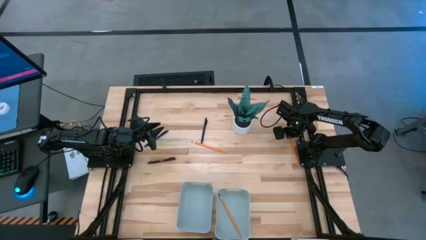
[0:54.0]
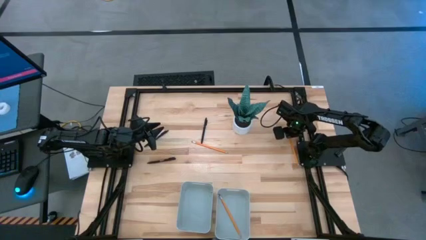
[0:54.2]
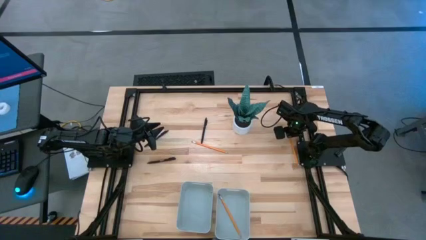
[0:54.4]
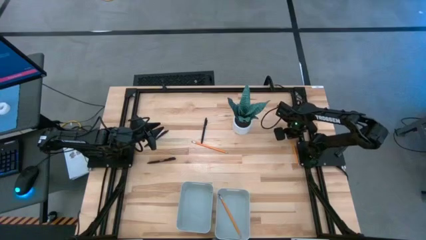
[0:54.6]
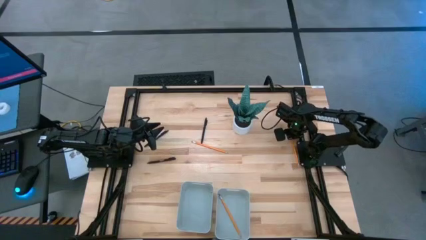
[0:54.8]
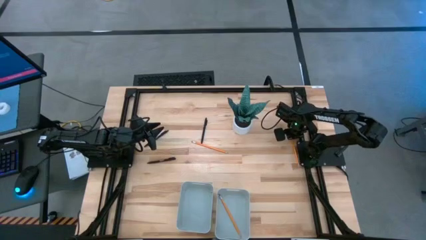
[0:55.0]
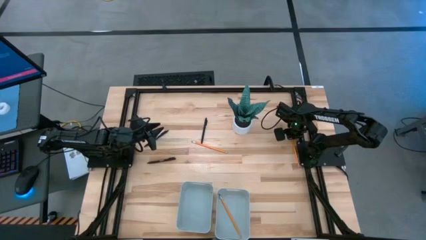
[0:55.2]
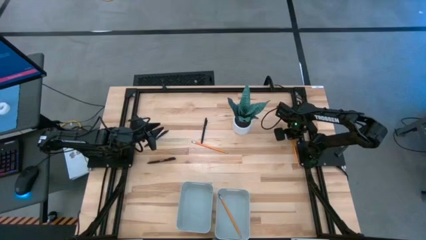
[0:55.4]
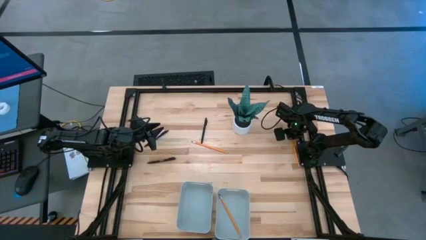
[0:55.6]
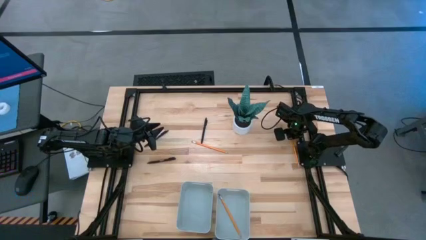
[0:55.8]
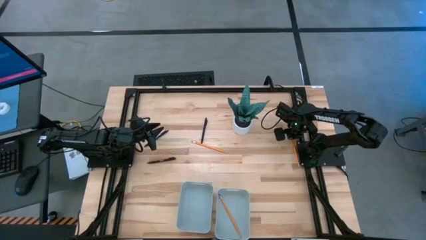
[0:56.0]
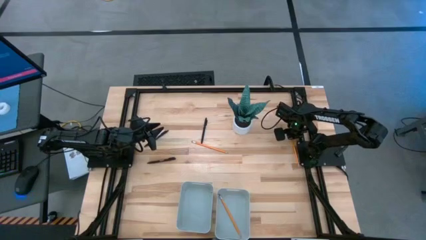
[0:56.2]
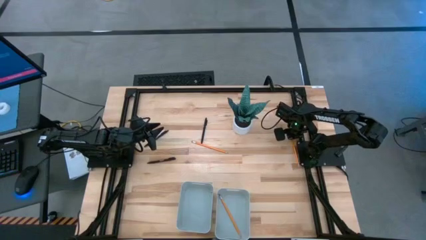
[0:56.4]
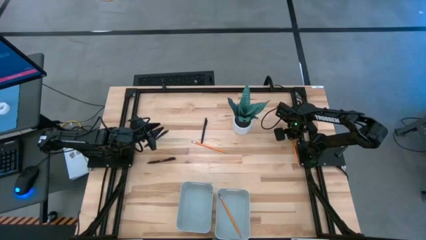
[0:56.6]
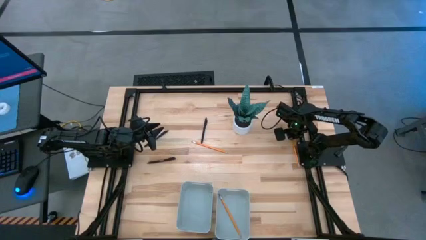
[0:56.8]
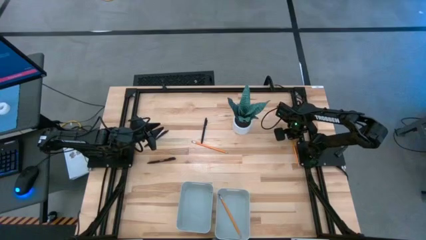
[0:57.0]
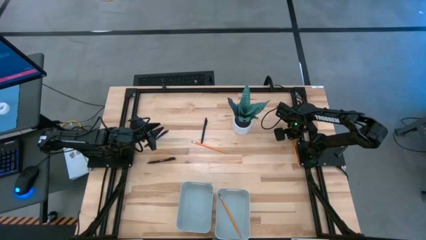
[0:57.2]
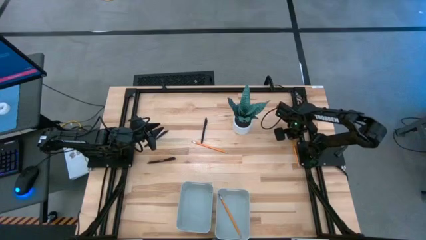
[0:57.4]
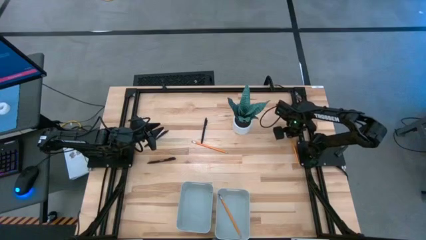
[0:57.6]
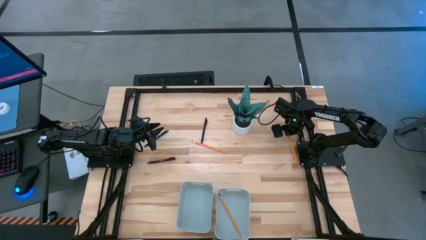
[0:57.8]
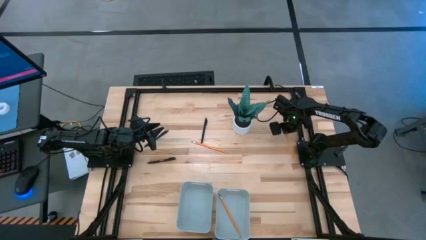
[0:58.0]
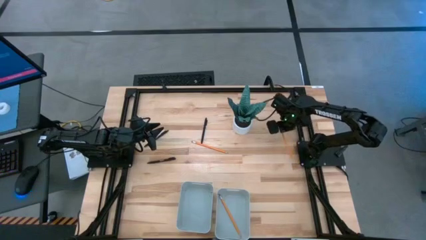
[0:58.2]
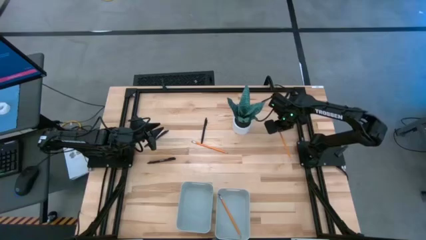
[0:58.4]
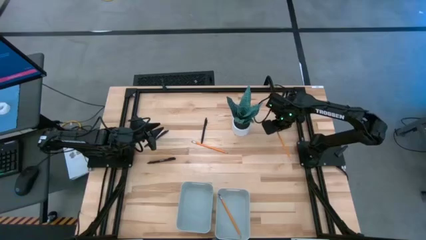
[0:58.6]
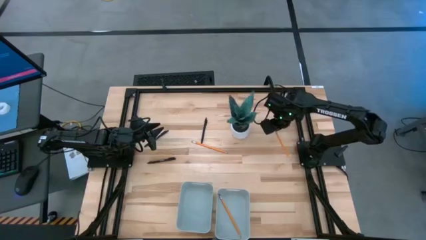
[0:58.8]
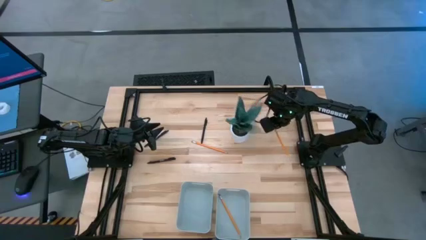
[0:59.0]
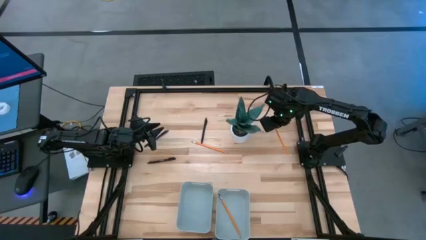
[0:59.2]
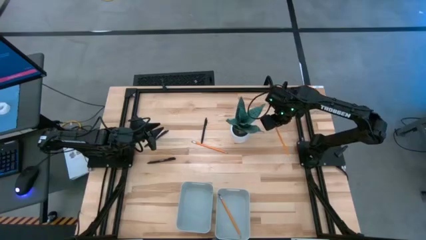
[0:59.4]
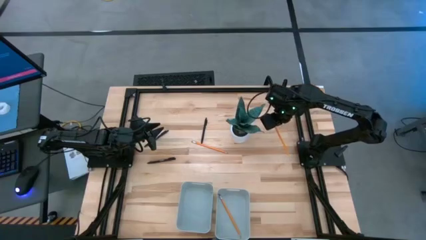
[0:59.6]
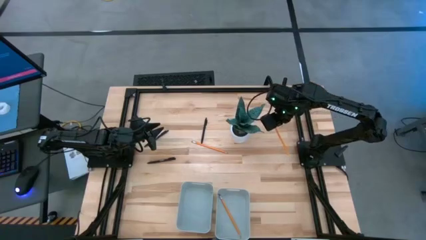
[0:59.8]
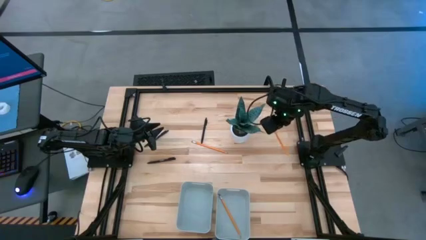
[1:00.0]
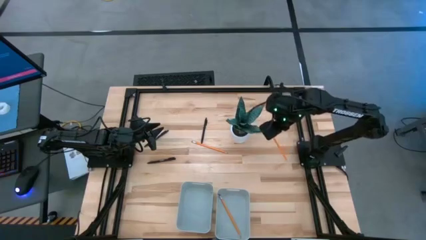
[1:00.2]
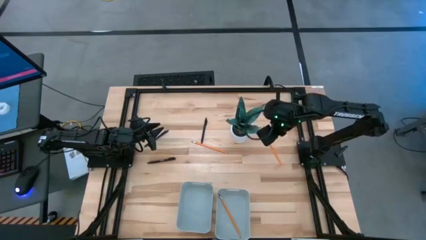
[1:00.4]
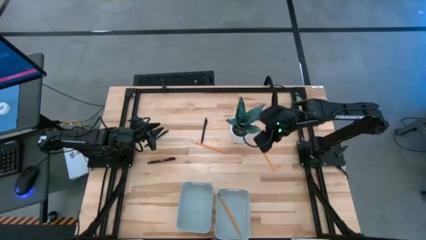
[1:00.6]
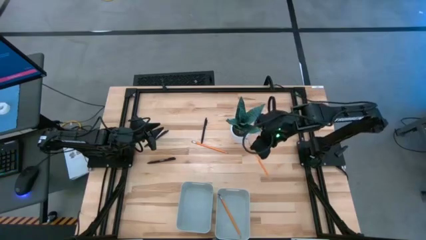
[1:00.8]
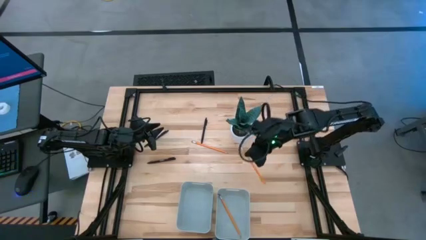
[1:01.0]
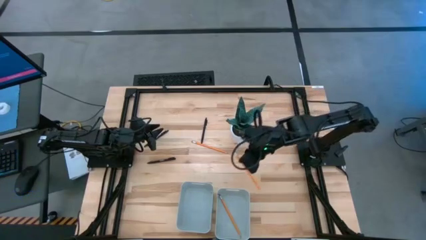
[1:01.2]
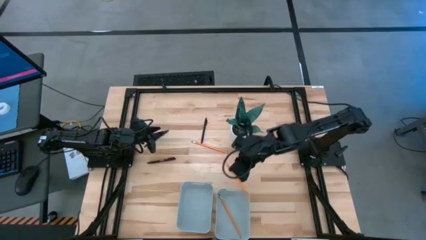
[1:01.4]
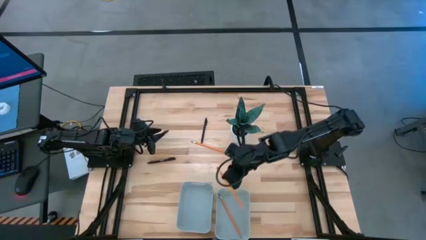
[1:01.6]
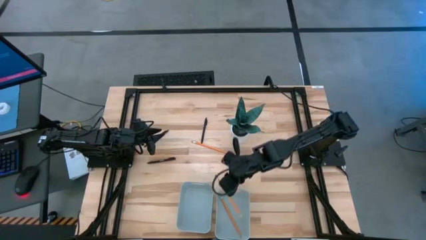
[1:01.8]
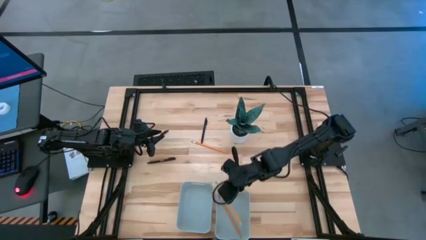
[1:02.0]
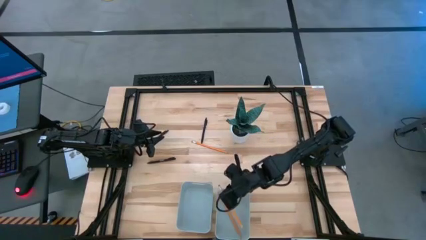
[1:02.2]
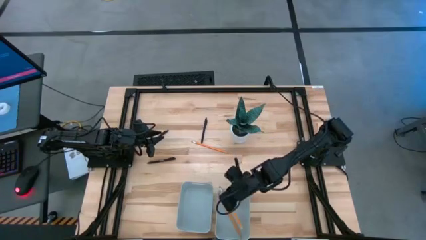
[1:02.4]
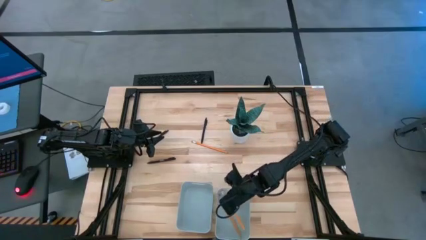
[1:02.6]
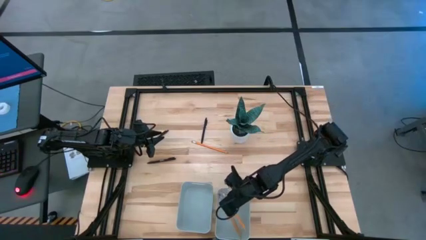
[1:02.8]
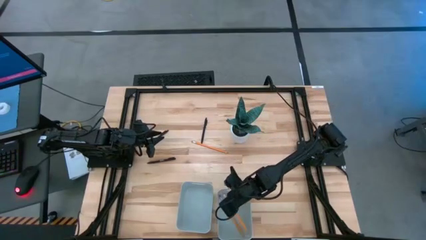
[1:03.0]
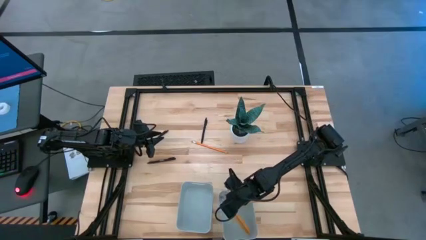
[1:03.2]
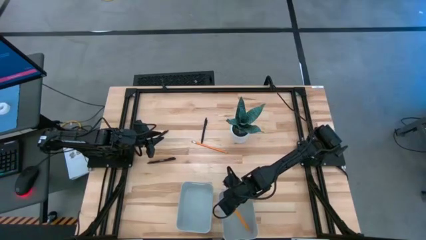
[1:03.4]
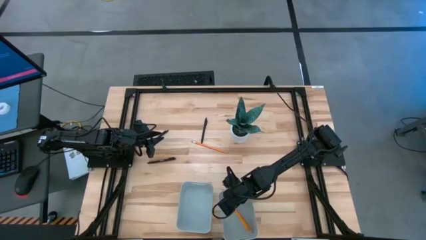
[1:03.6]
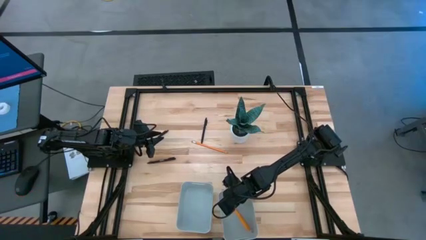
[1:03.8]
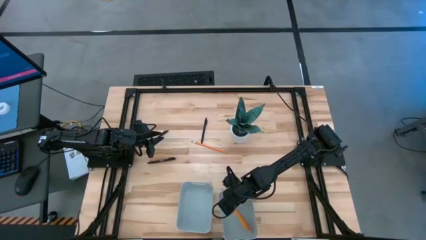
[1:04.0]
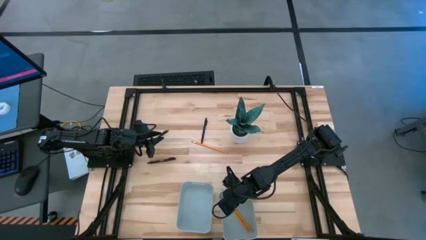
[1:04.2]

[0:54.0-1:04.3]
Task: Sort pens & pencils
Put the right pencil into the right gray bin

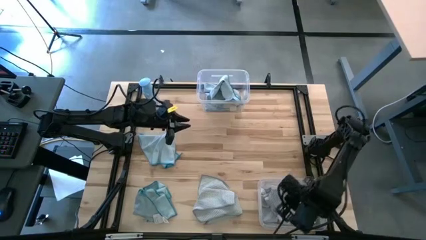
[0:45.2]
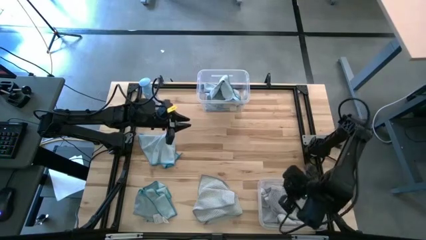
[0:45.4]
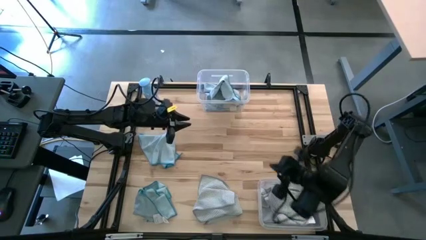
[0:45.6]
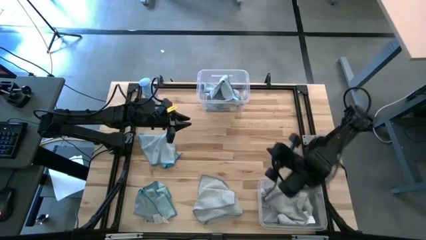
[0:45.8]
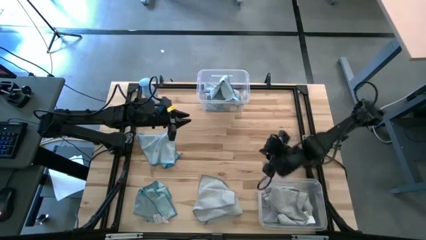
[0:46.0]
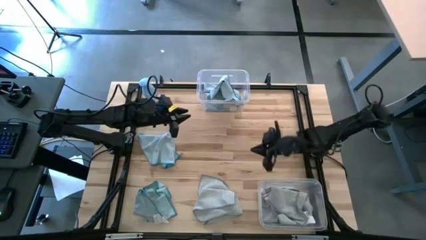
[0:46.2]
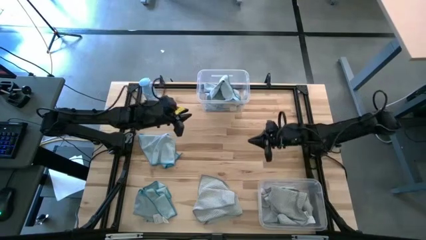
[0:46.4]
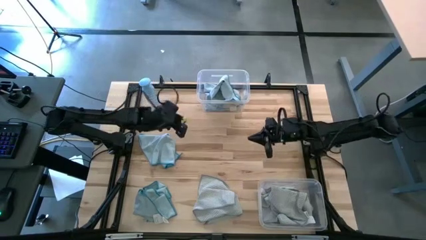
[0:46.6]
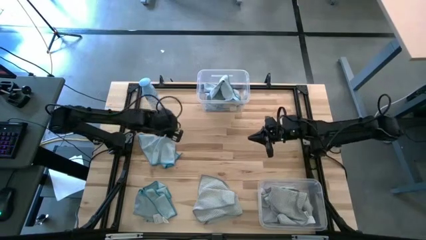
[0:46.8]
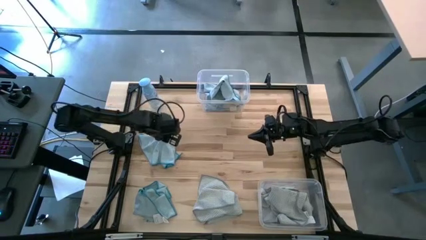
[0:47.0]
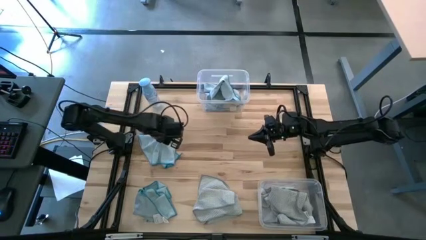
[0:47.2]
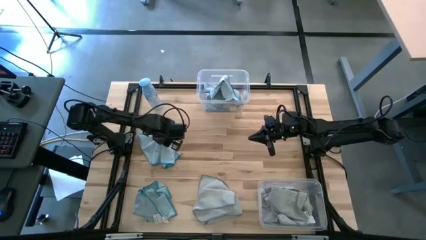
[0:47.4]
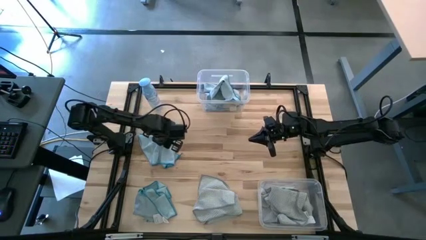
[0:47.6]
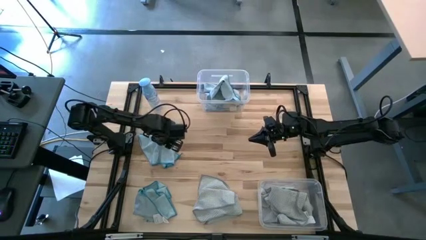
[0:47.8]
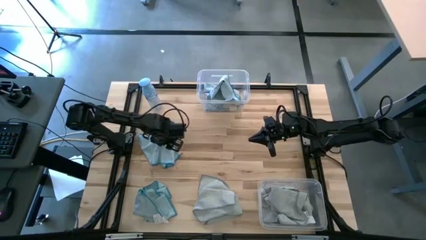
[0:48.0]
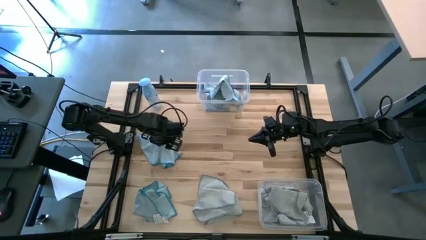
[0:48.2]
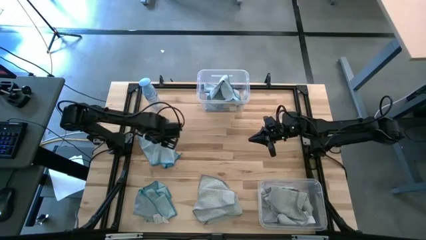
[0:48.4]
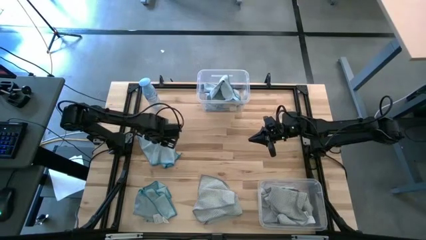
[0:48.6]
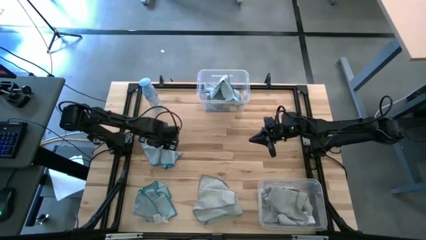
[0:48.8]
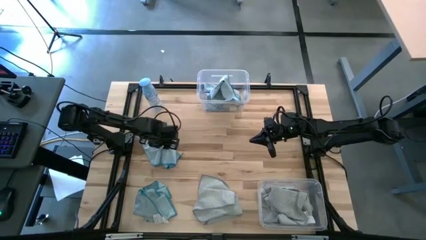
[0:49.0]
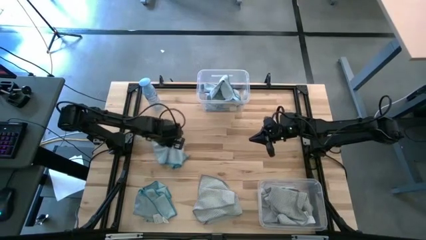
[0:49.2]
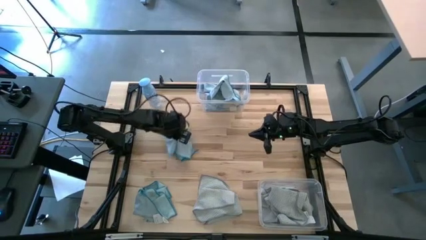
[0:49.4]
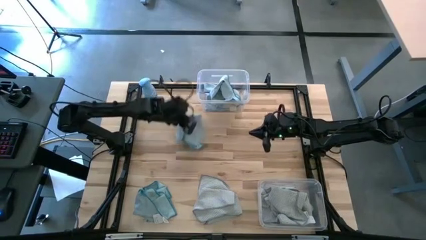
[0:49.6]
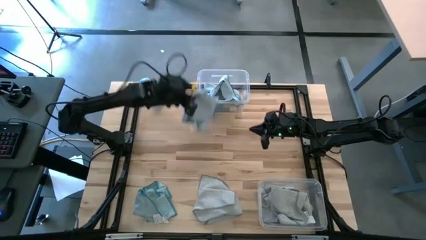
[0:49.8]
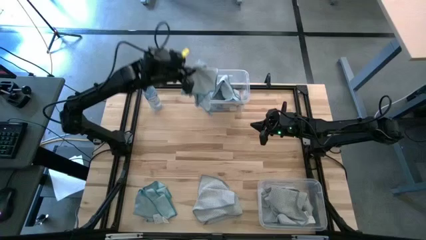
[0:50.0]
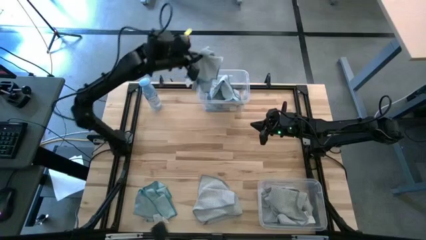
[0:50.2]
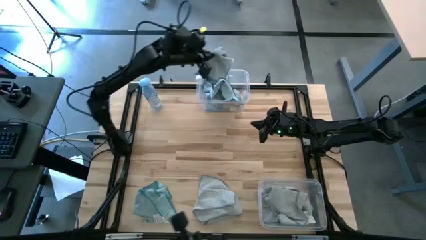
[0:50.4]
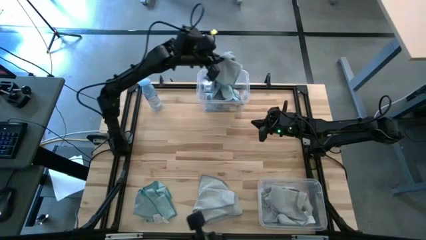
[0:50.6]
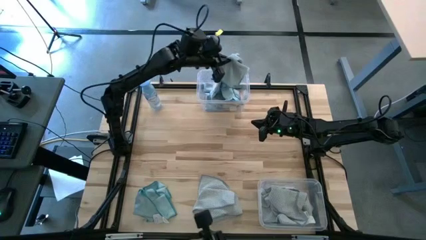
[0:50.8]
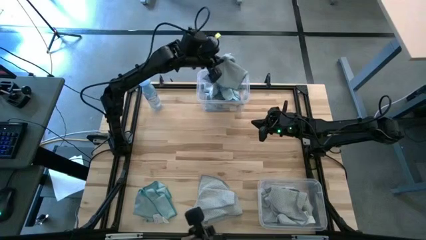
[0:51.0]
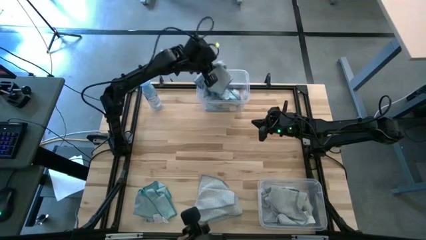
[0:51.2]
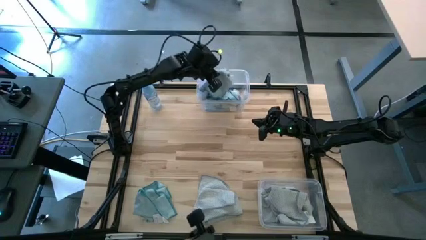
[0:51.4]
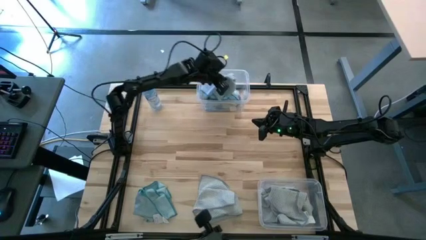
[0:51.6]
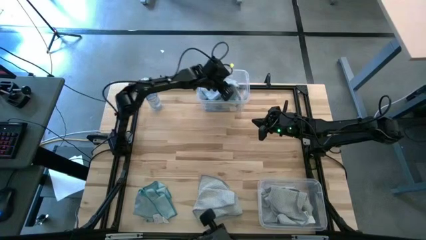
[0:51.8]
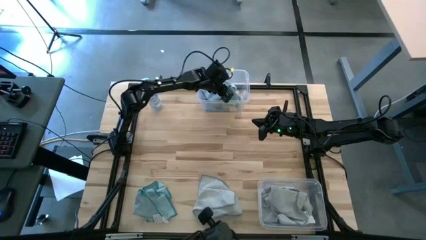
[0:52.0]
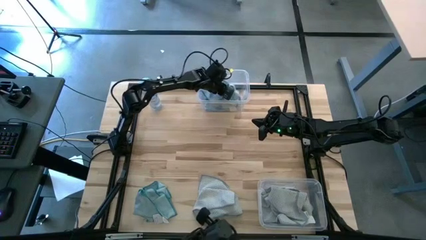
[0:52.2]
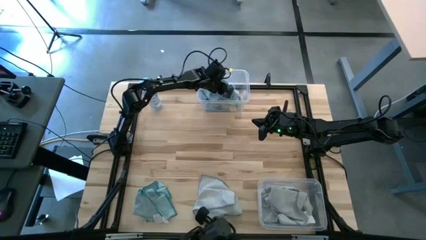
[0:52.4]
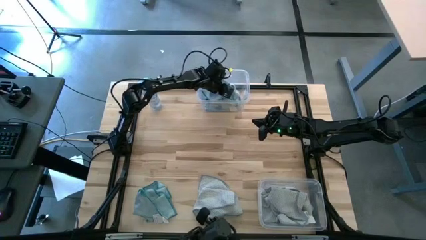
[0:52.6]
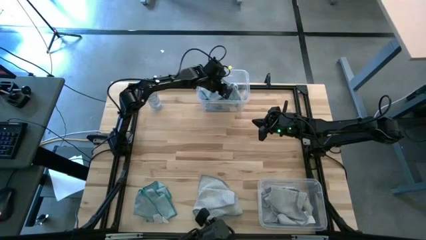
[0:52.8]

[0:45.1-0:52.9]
Task: Sort microfiber towel by color & place in baskets
Put the blue towel into the top transparent bin
